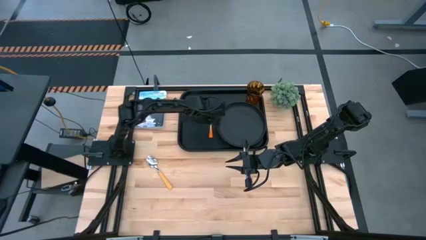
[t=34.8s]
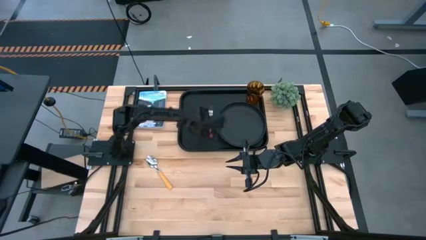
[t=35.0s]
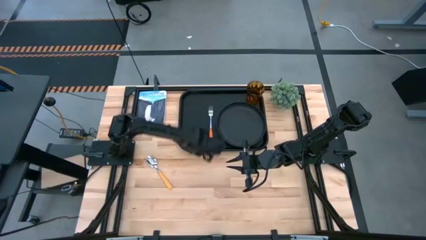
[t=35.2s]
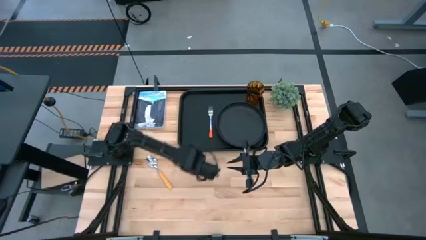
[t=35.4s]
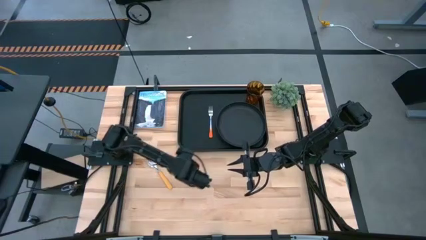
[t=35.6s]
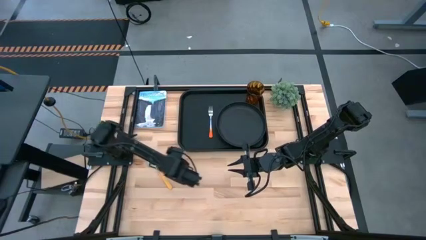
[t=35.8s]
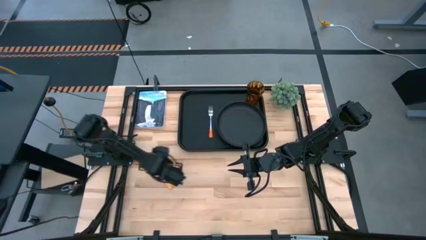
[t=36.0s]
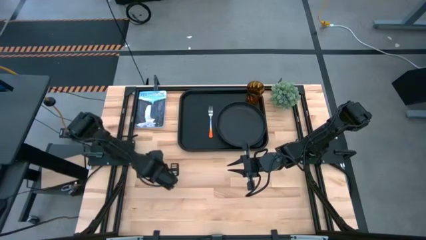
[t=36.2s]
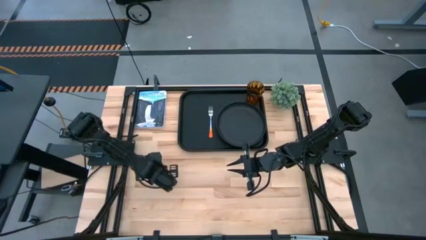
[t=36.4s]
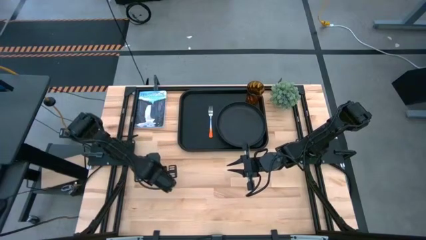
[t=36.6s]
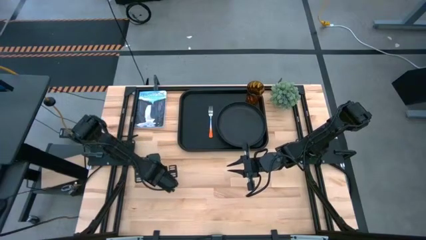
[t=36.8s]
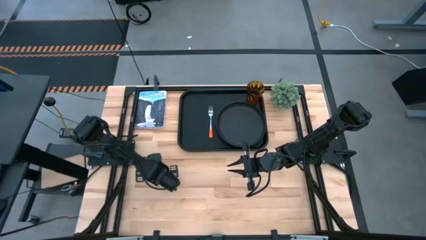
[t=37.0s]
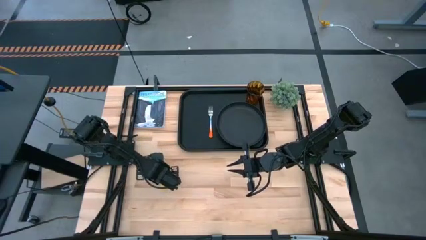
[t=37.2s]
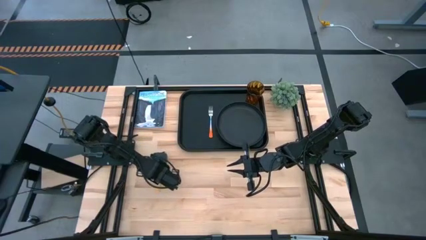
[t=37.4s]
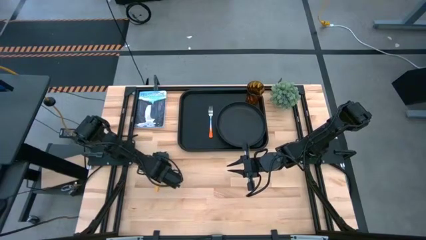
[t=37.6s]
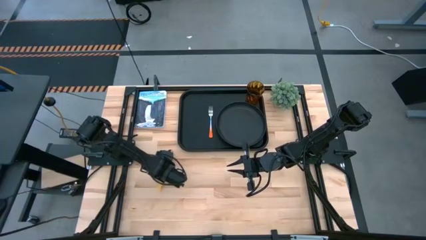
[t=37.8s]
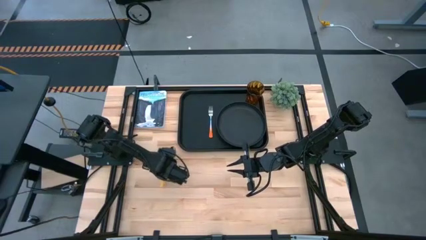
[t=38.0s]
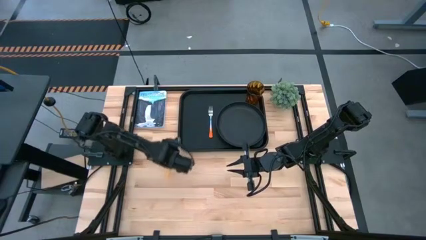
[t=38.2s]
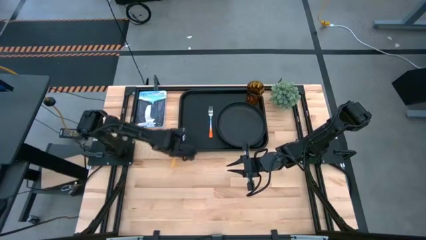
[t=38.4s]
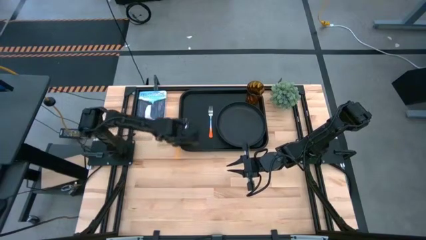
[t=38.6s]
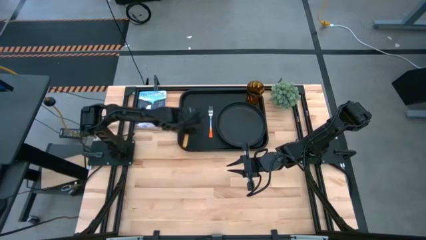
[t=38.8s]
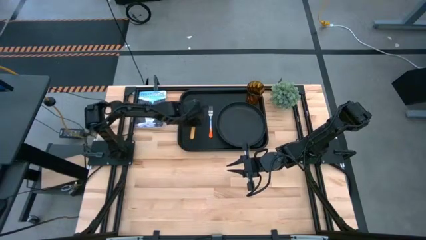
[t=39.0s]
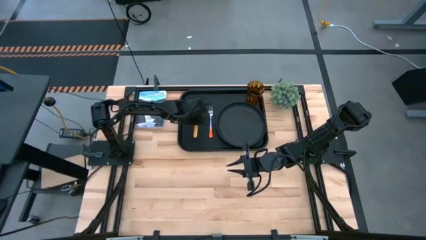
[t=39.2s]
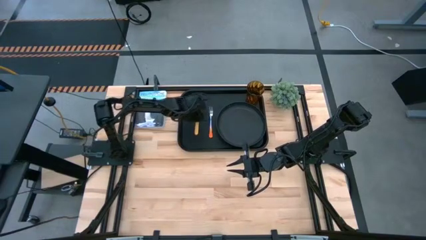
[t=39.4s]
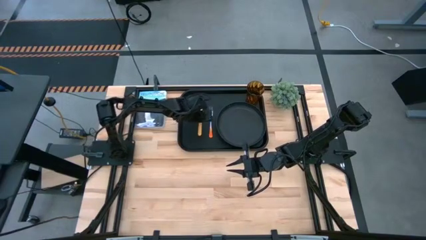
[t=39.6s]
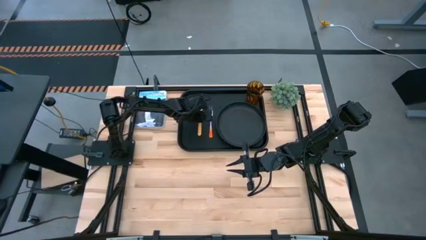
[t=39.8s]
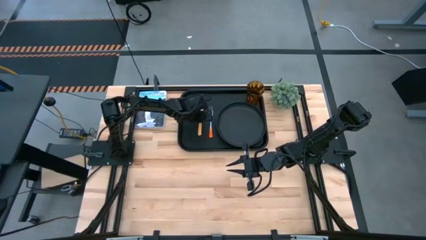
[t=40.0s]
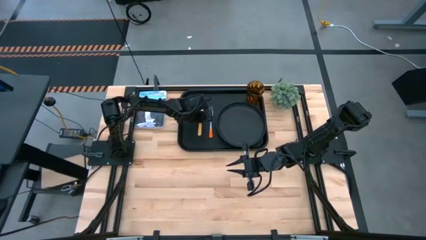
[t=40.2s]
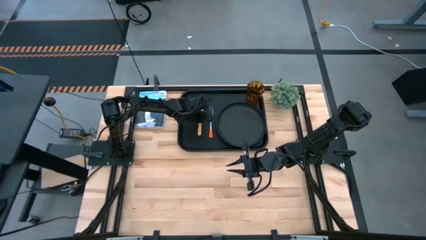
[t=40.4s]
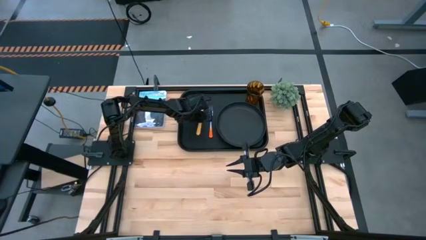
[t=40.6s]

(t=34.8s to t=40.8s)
Task: Pick and place plate/cup/fork/spoon on tray
Put the yellow spoon on the black tray to the left side of the orange fork

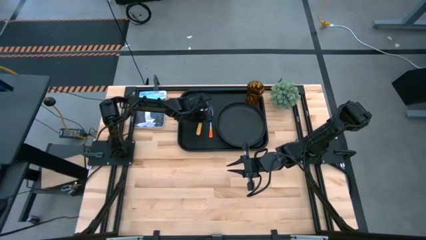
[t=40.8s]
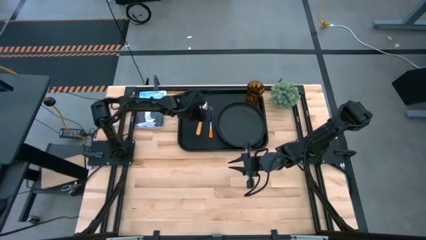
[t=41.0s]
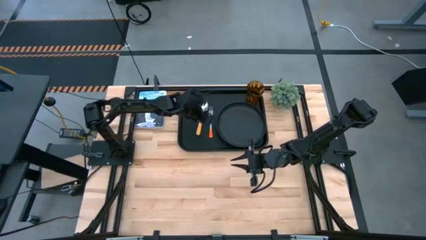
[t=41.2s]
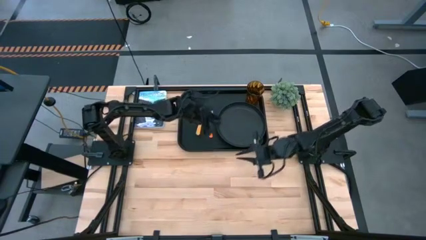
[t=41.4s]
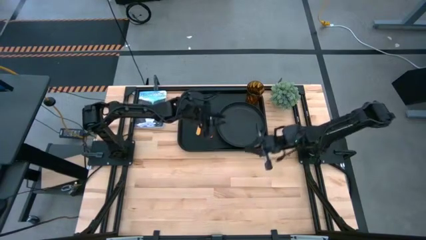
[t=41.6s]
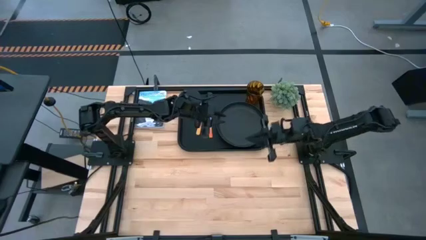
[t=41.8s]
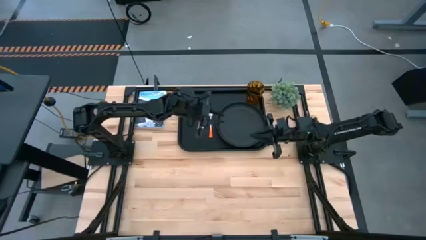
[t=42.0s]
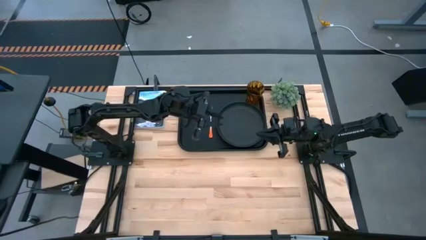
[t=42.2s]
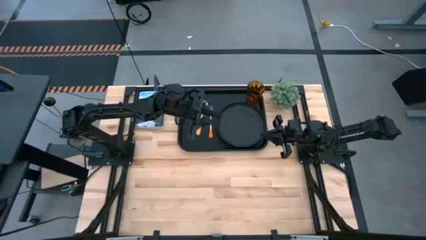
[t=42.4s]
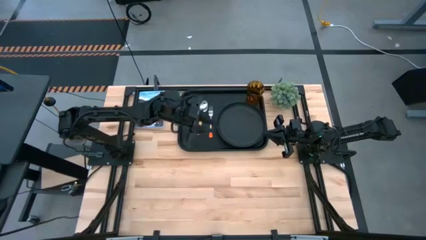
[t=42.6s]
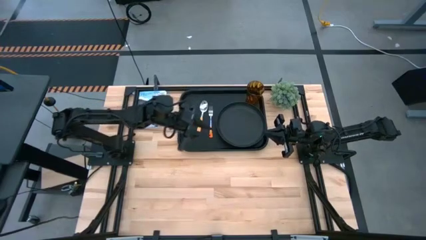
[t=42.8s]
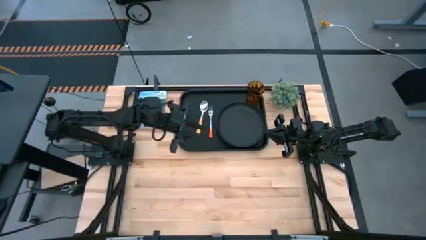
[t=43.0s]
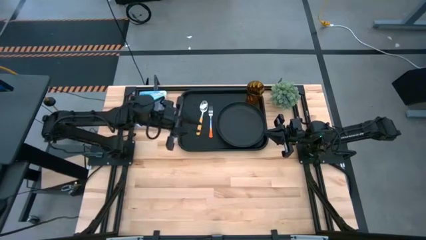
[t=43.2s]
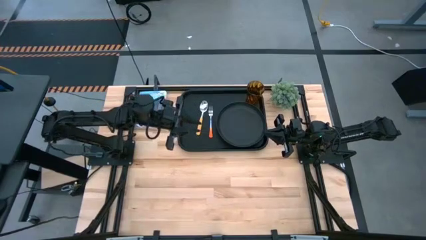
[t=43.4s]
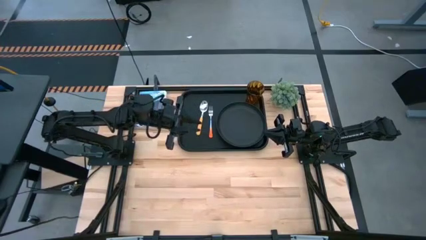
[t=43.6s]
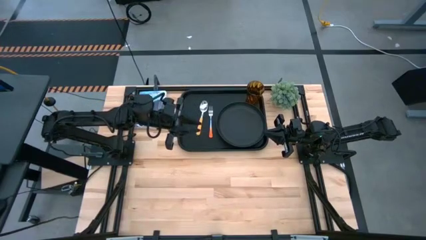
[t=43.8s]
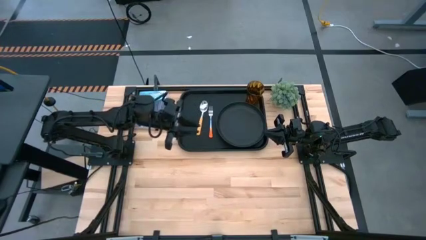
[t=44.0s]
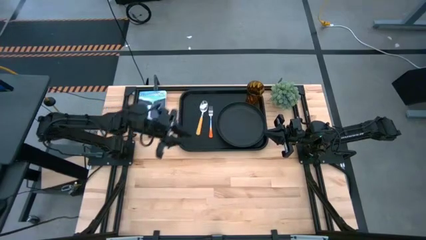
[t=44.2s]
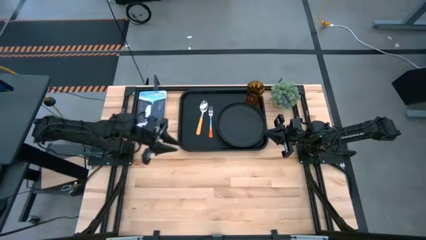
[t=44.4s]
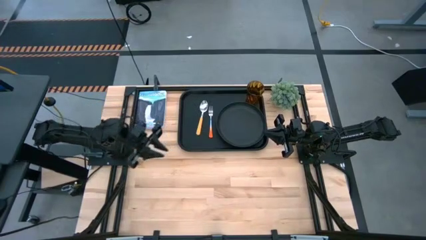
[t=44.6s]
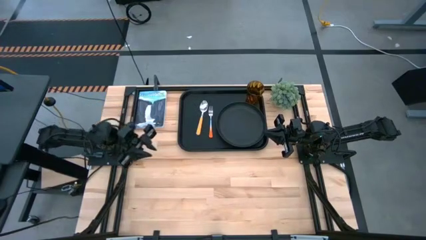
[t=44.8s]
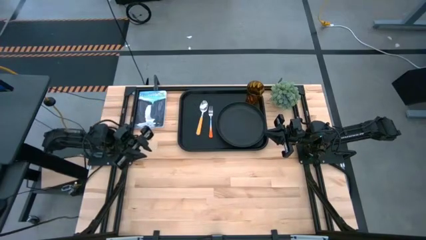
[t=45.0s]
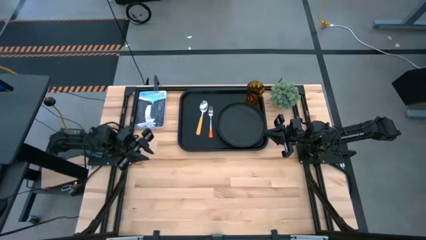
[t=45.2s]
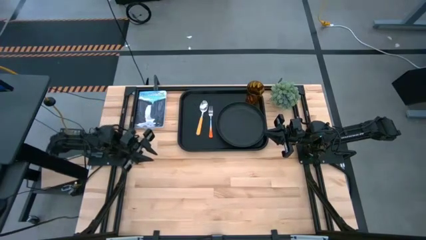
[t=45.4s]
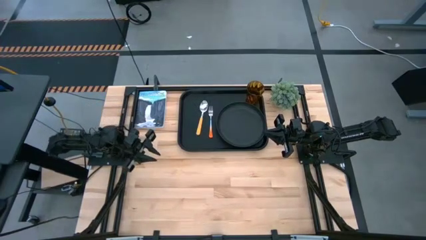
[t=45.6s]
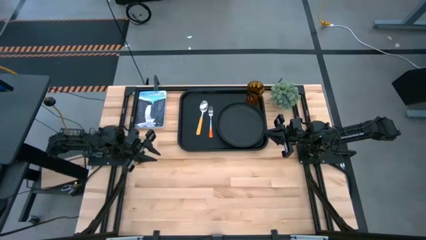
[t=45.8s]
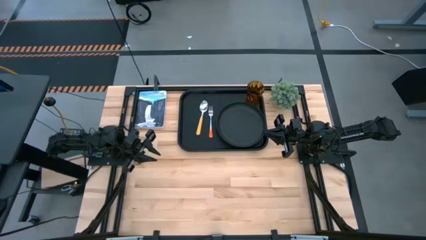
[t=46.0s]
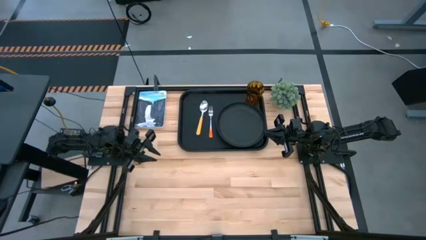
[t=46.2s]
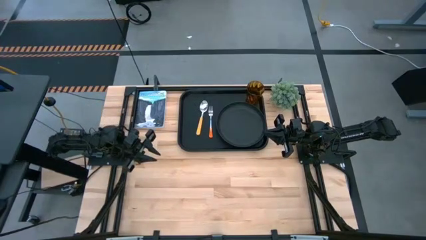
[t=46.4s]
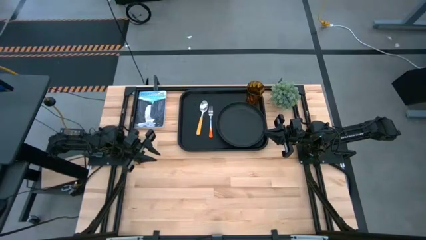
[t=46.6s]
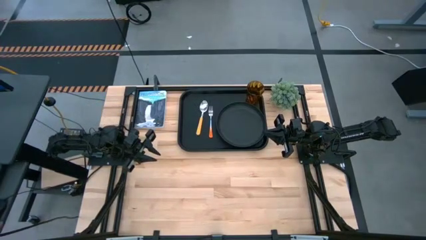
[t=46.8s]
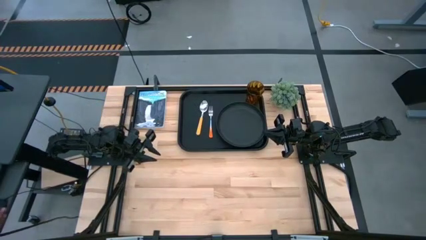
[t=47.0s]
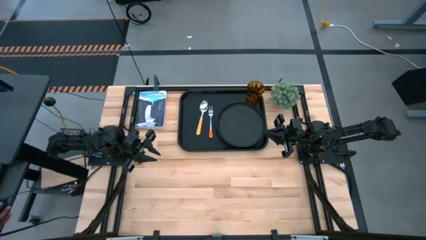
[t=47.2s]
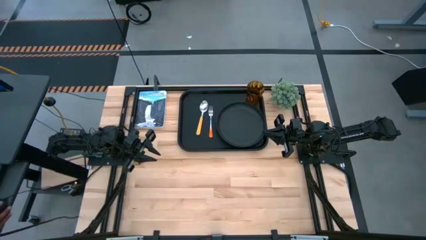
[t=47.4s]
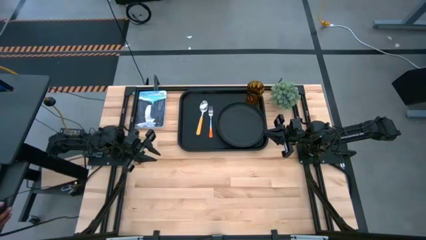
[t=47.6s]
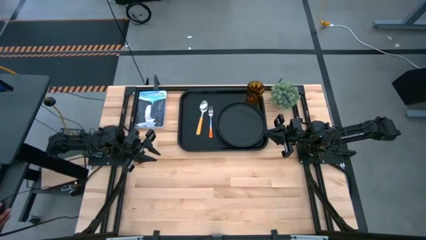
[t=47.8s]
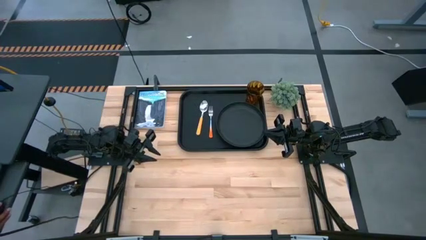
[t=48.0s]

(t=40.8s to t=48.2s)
Return to Home Position
